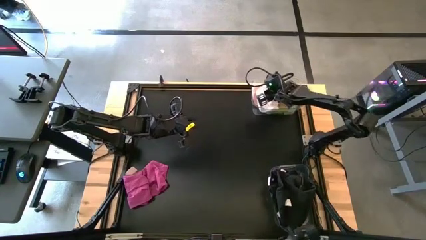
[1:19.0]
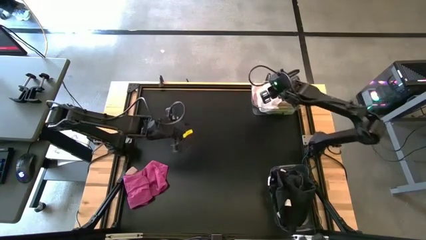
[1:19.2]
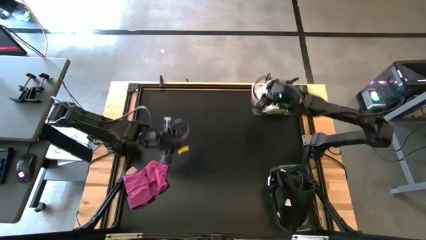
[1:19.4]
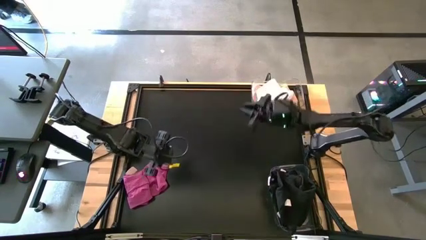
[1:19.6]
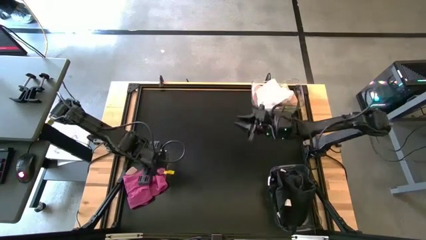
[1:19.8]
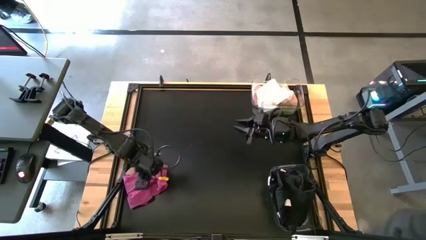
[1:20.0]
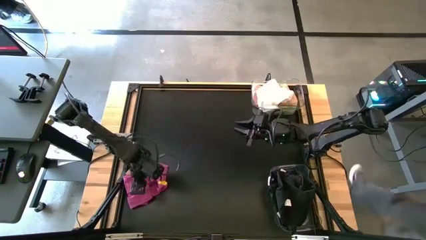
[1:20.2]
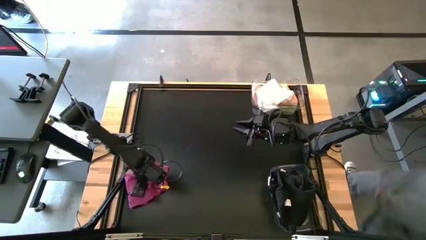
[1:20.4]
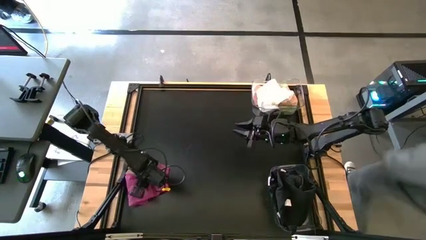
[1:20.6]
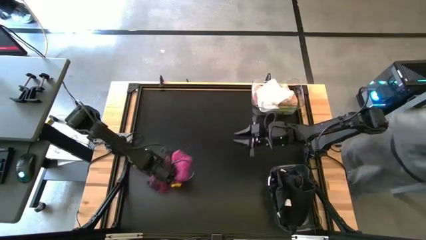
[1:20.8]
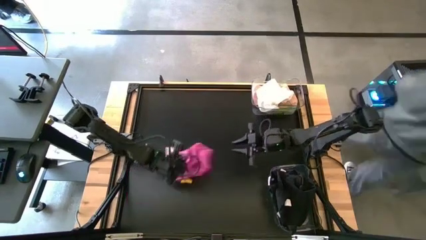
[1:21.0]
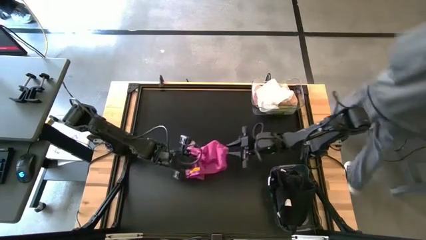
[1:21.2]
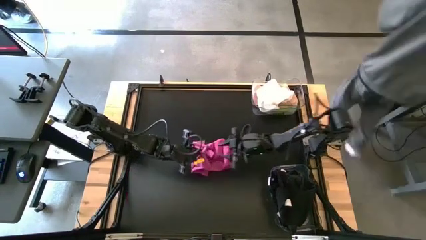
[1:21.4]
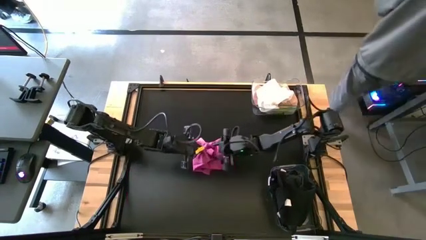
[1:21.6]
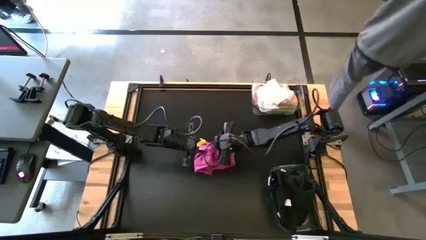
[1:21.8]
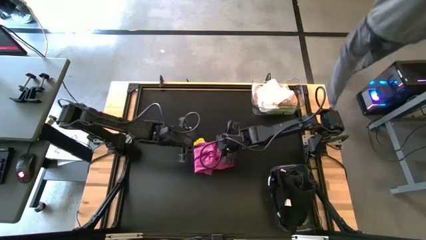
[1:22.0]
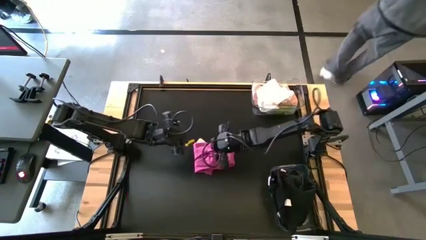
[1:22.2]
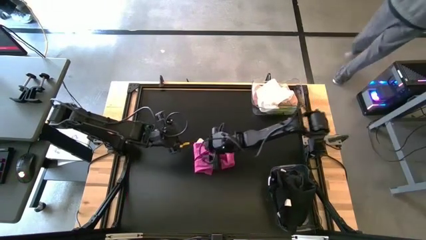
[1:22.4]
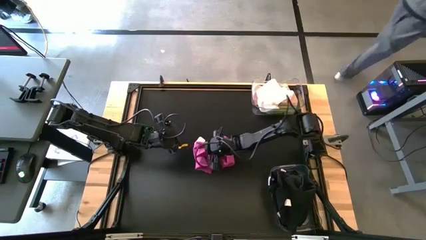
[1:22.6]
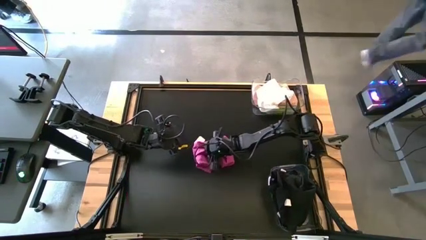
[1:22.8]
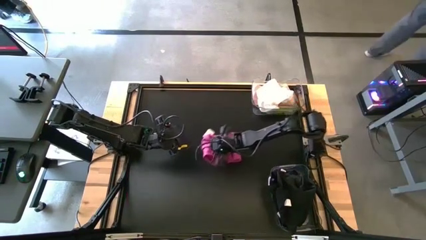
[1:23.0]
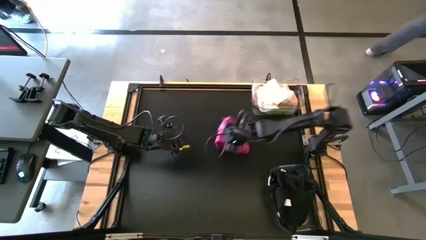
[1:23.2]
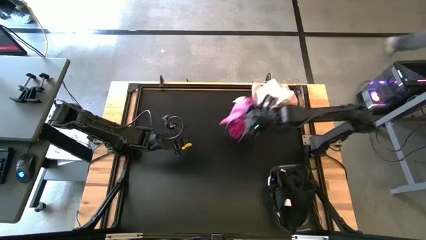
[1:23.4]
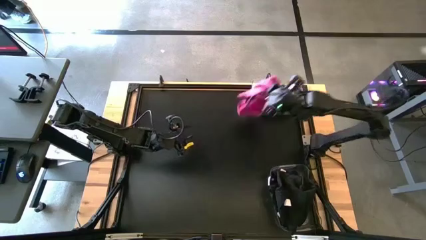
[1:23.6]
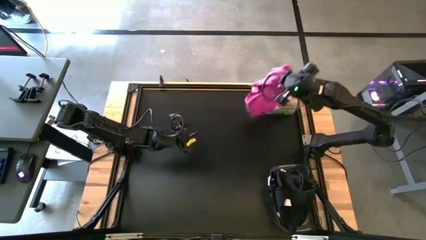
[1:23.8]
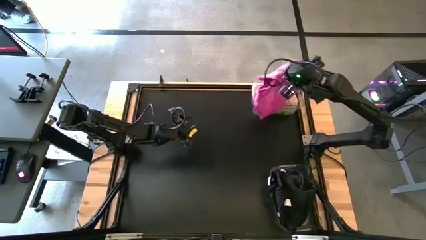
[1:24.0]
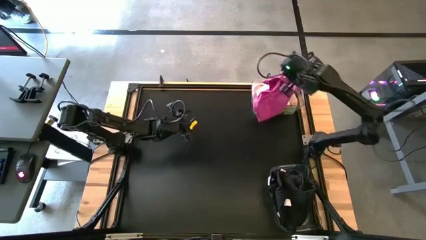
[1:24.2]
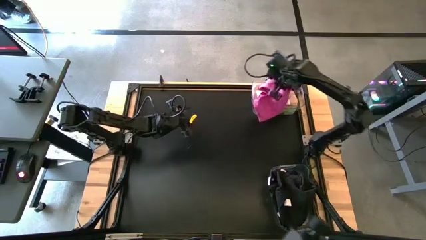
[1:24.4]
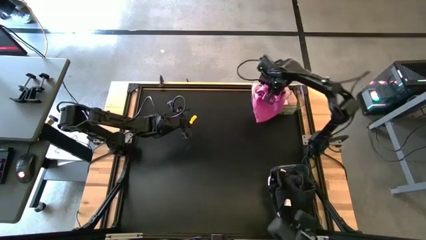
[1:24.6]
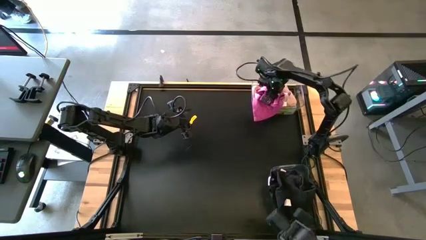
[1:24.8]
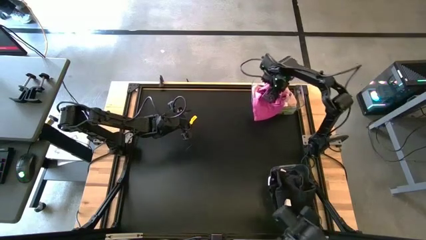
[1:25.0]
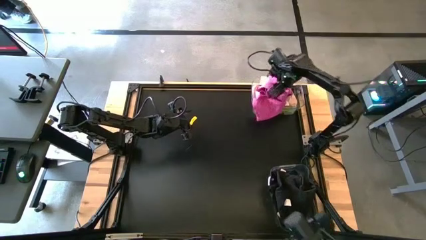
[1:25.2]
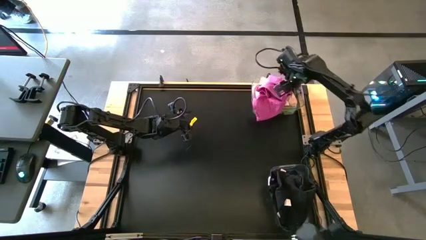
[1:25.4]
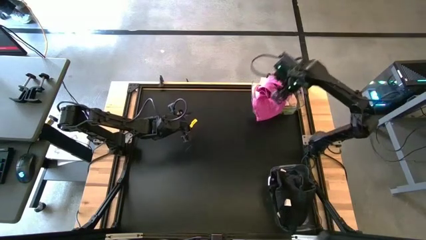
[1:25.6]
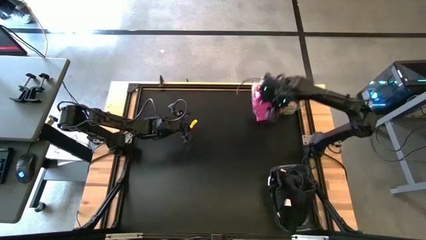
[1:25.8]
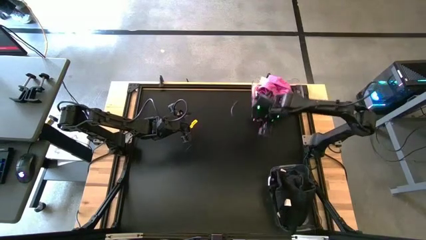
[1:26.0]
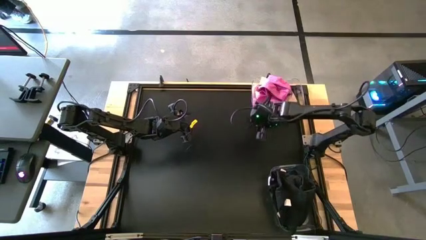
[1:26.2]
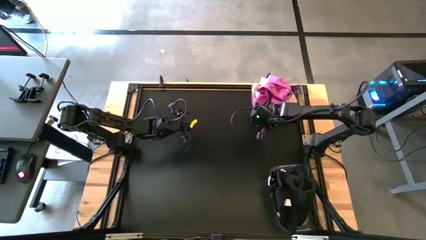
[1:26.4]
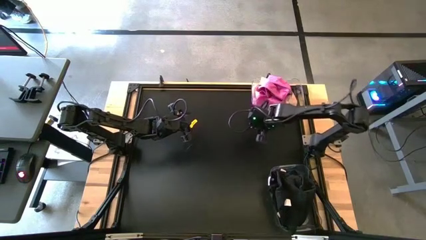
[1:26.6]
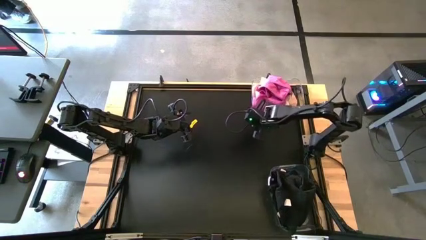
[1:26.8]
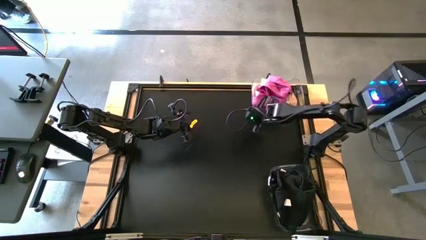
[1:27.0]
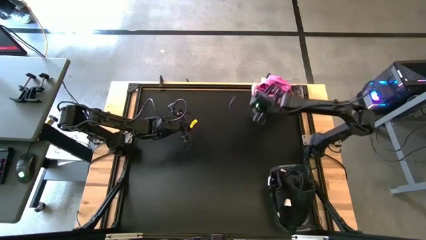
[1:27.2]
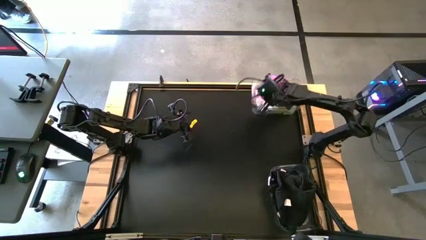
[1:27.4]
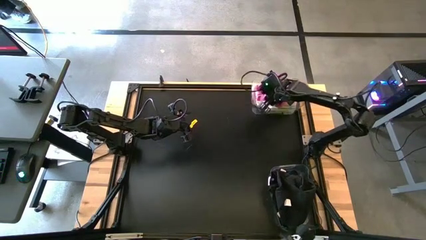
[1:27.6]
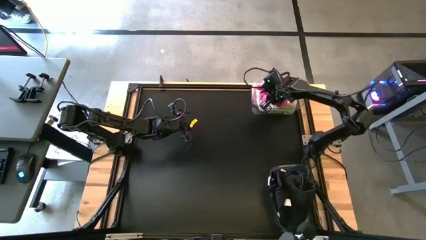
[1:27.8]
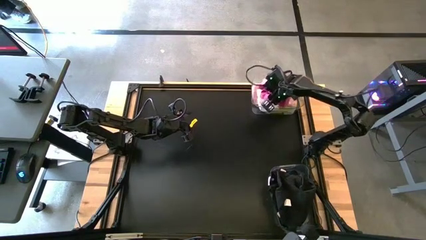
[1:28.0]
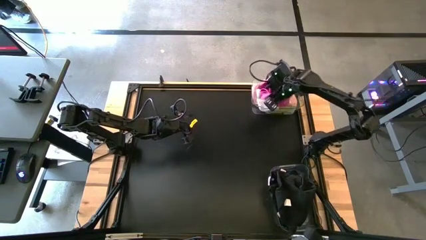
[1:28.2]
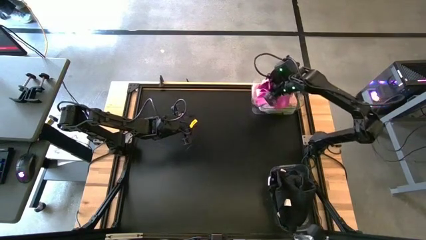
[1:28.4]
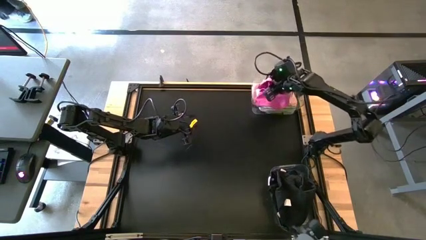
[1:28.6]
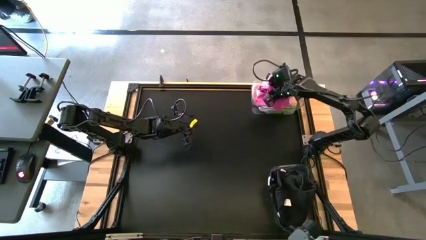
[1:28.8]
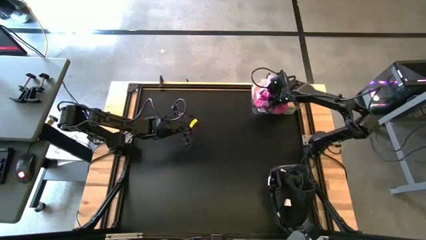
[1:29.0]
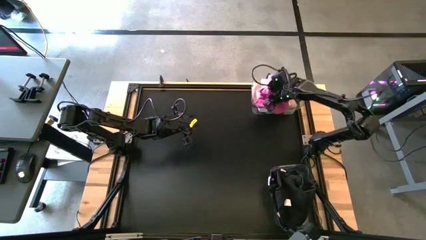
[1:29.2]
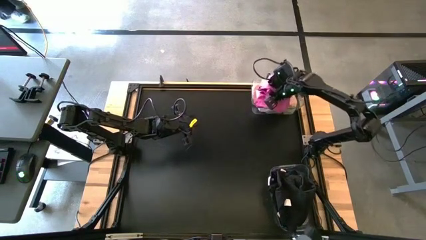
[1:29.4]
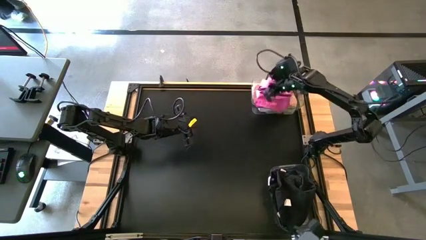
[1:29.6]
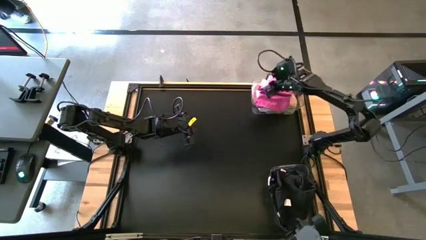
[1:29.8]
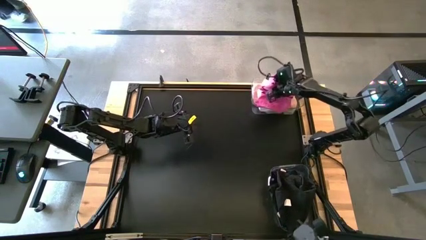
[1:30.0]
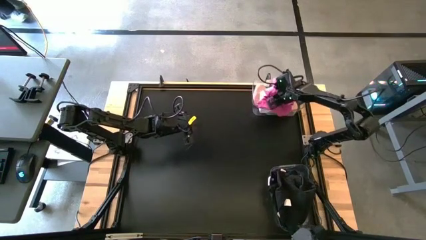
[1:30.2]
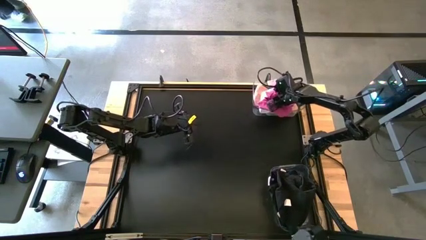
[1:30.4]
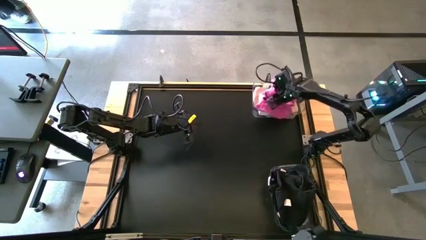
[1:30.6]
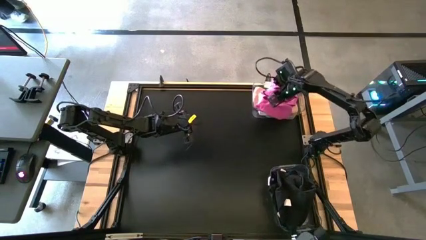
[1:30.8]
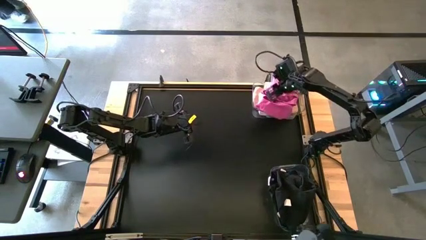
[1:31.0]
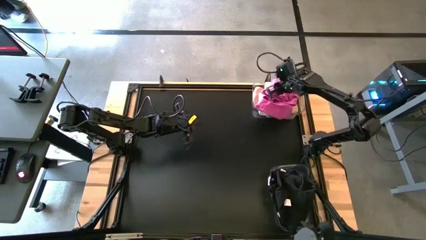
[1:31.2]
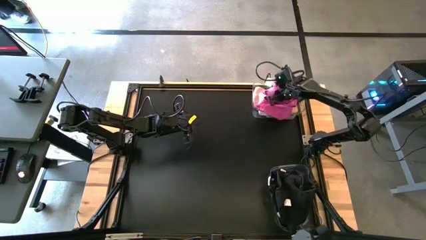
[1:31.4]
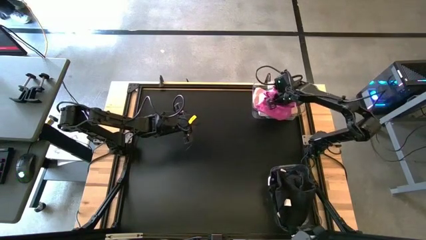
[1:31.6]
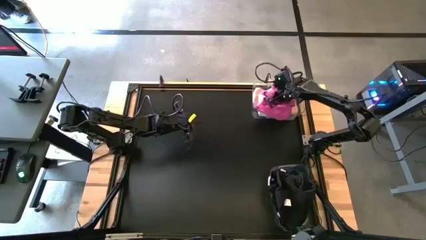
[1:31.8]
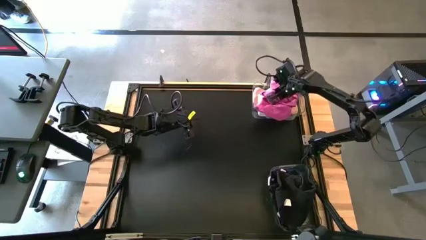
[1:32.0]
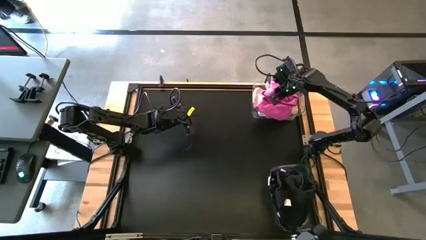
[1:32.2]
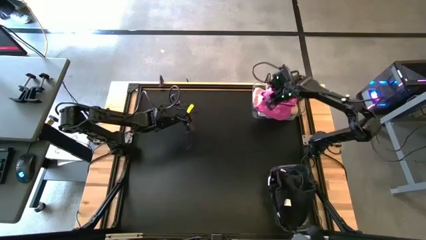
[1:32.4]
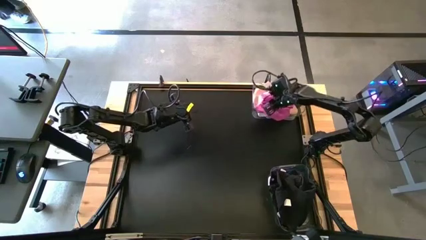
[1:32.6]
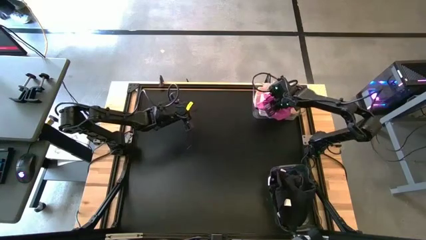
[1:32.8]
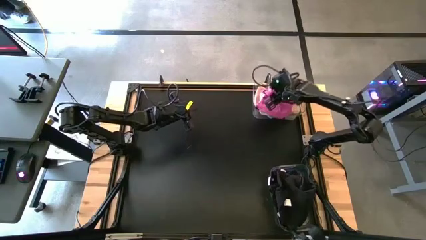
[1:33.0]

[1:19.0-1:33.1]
Task: Sort towels by color in basket
Put the pink towel into the top transparent bin
